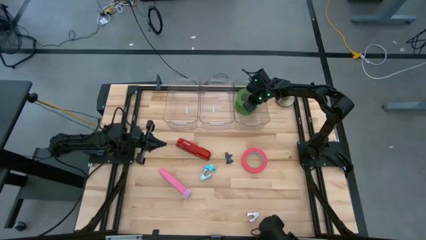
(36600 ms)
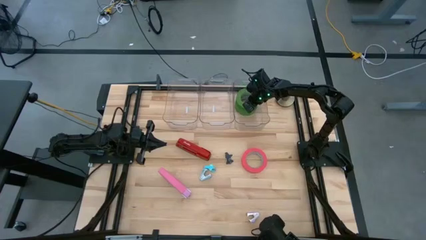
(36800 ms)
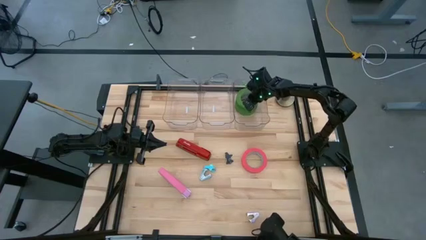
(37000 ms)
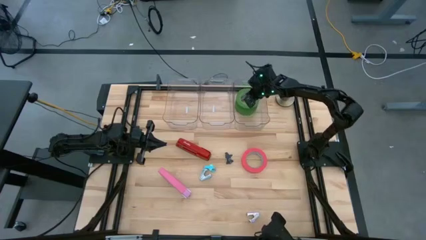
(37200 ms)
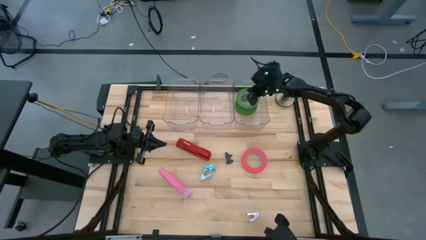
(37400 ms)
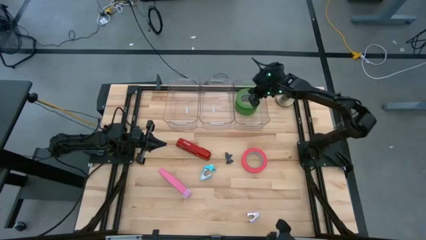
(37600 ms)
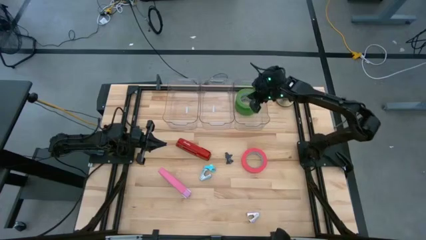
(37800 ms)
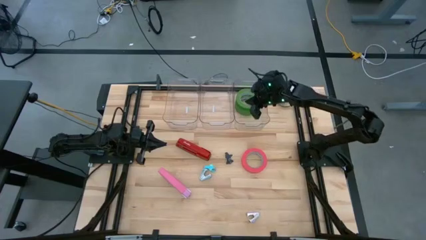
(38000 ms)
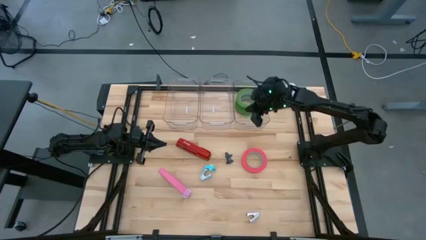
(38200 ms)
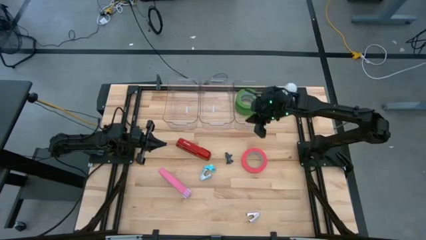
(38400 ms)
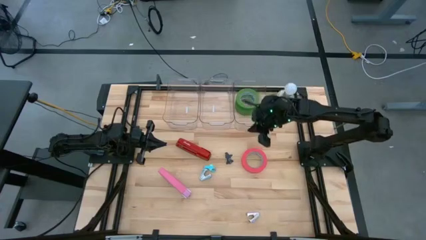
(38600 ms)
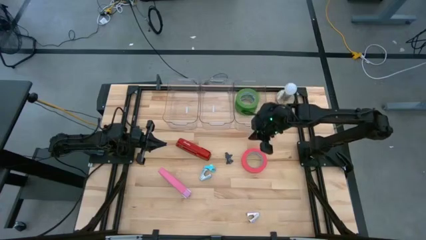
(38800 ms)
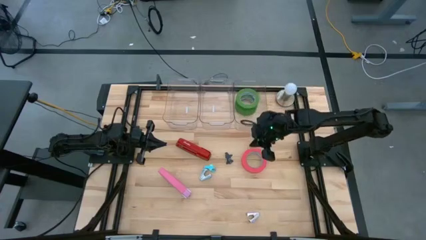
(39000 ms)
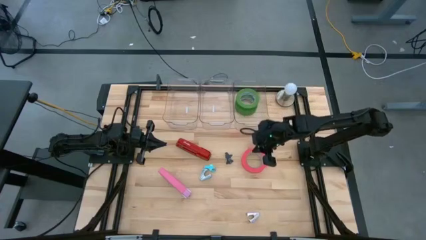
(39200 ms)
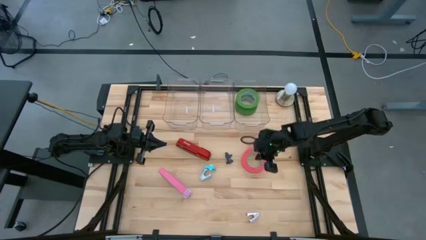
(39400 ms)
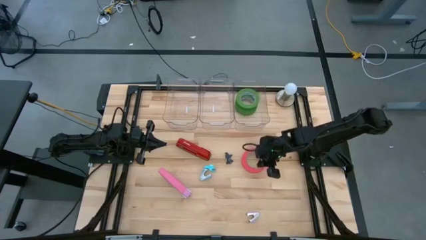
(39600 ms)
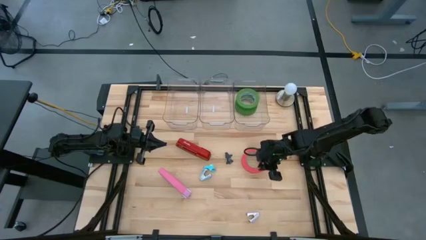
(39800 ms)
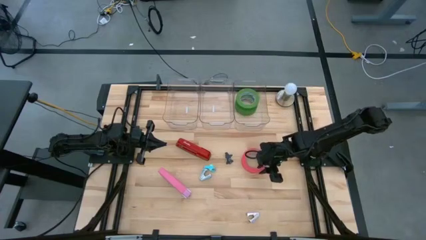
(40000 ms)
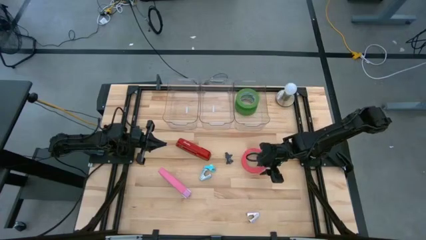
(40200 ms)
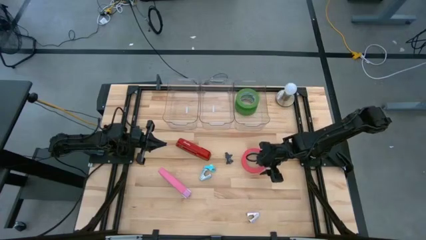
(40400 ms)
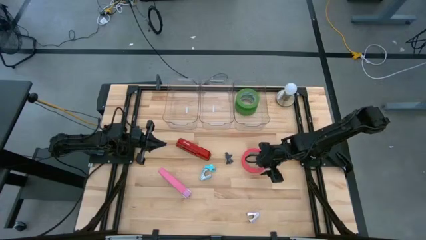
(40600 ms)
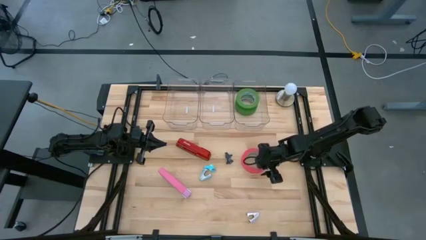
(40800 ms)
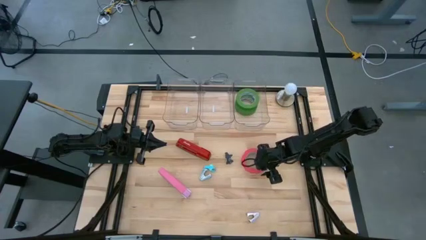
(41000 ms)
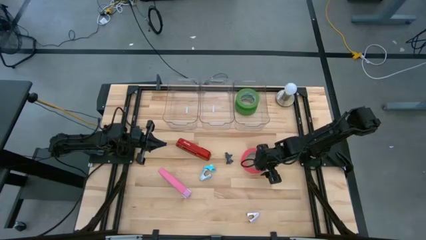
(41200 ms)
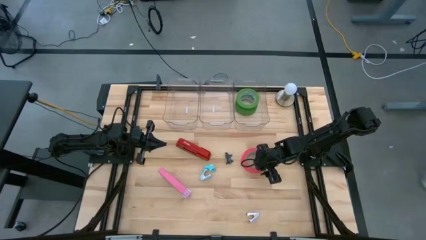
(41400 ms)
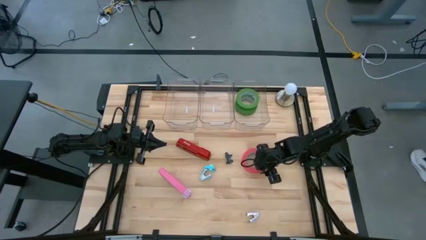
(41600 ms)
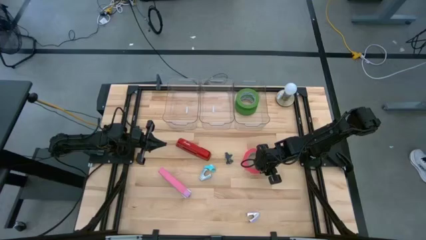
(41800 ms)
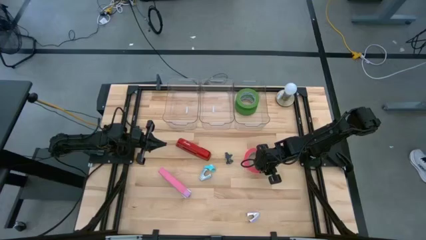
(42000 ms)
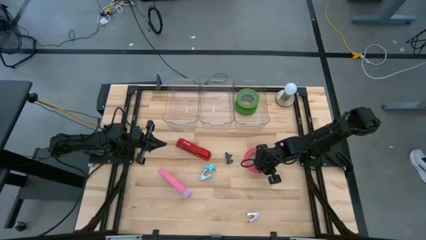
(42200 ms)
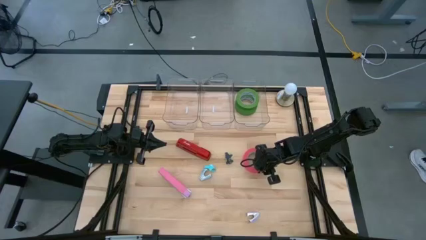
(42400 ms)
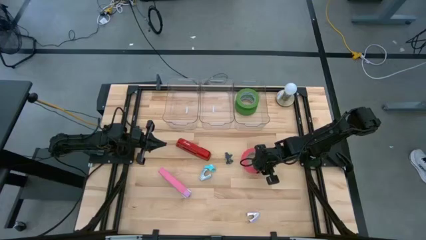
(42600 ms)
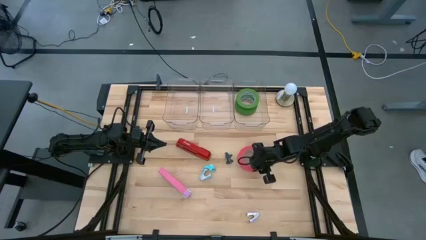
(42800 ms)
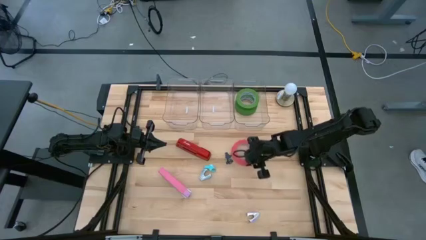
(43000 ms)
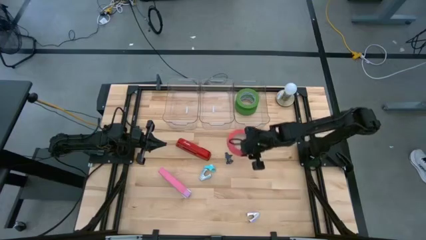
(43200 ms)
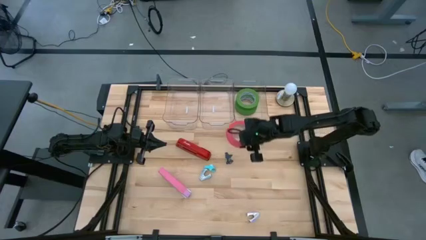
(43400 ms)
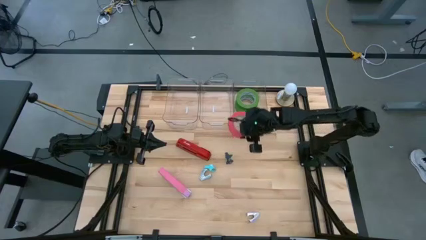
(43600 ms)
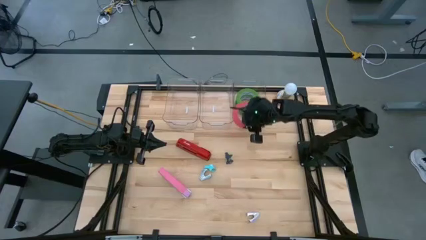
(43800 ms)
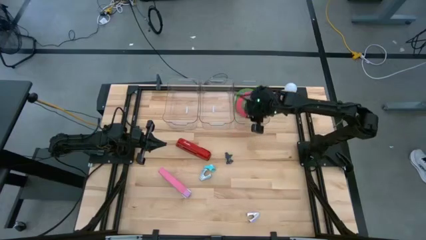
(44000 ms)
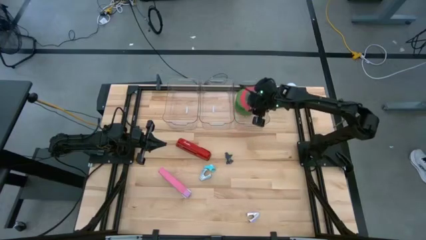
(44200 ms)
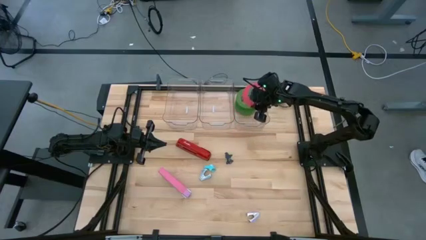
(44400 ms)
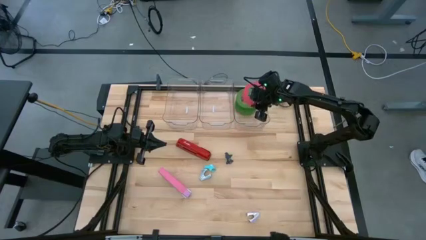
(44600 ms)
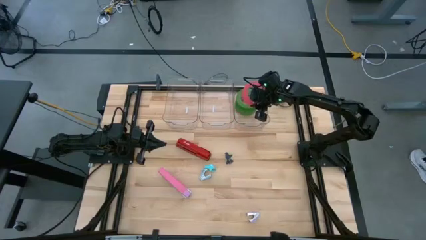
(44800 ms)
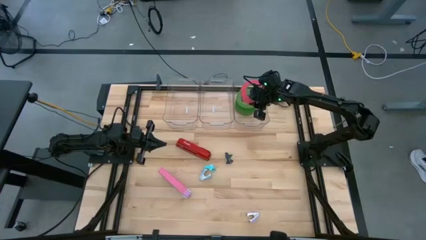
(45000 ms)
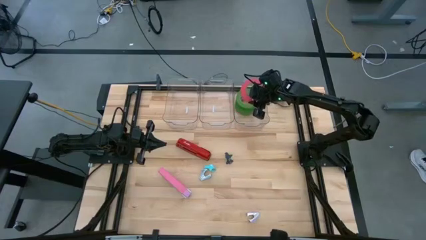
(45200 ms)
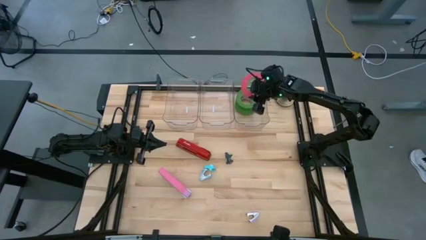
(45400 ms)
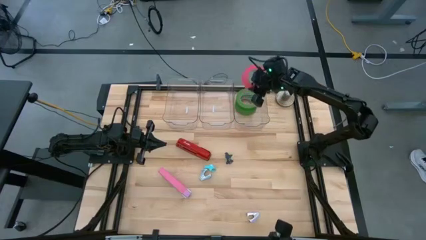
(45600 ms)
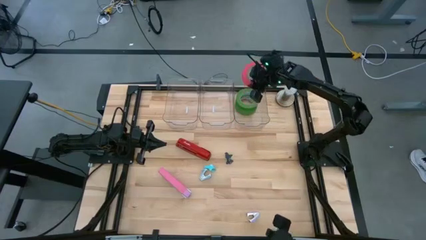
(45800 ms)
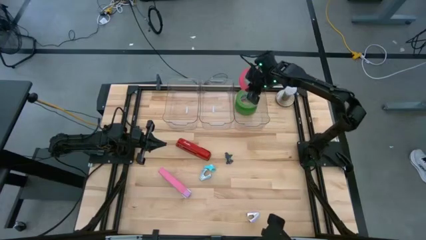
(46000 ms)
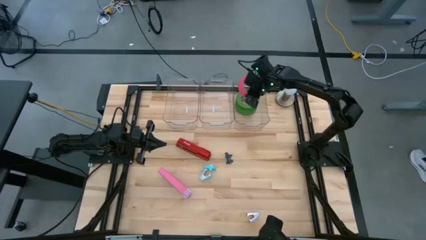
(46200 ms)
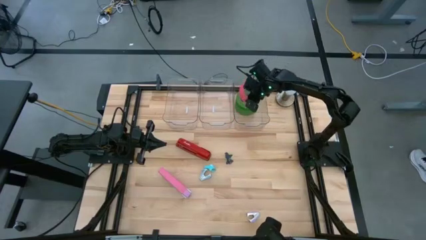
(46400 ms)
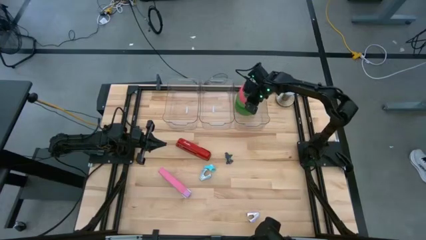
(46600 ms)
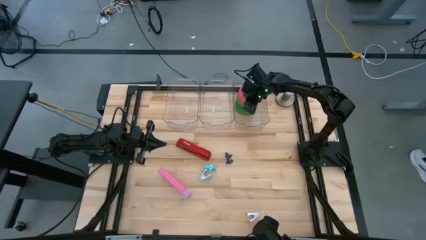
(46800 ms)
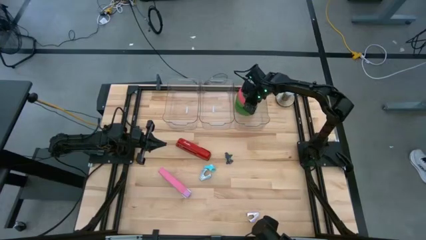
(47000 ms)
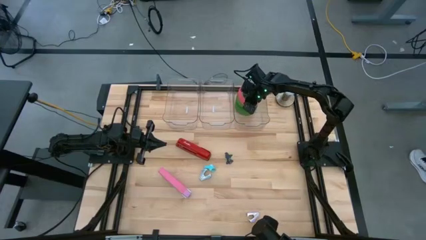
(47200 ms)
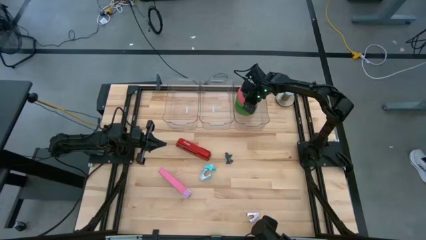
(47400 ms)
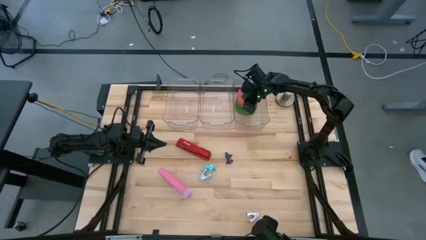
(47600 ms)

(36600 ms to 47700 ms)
Task: Pick and place Stapler, Stapler remover, tape
Put the pink tape into the right transparent bin

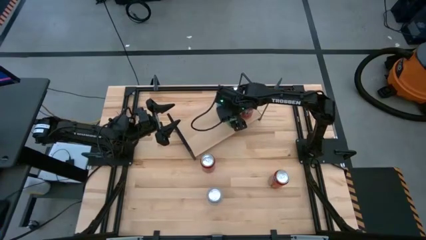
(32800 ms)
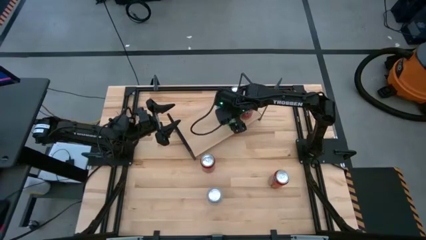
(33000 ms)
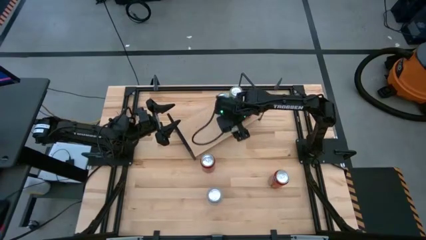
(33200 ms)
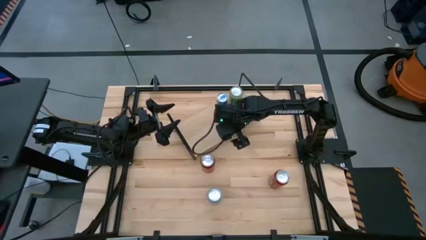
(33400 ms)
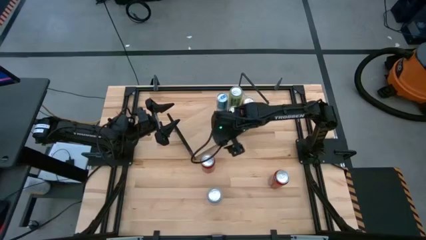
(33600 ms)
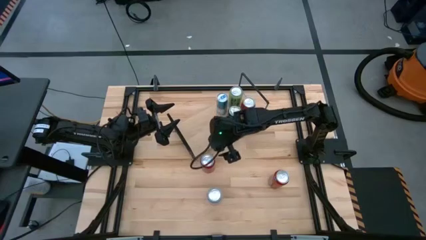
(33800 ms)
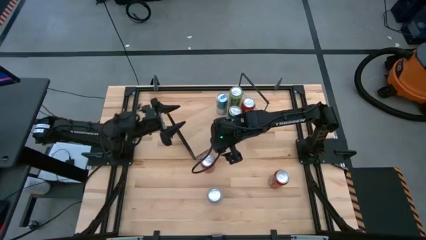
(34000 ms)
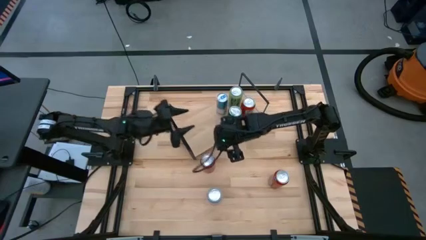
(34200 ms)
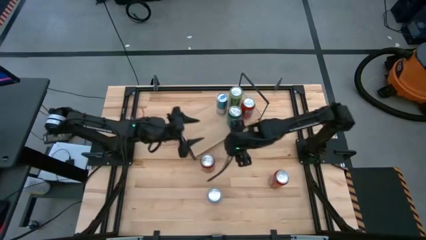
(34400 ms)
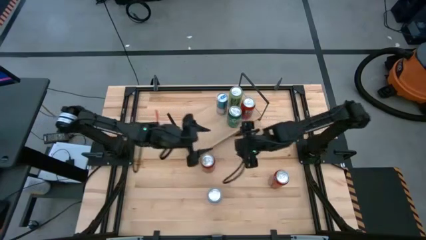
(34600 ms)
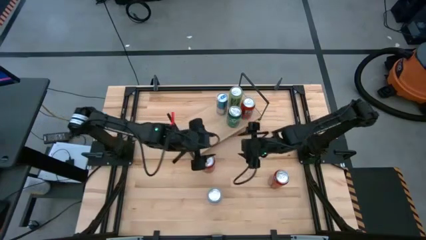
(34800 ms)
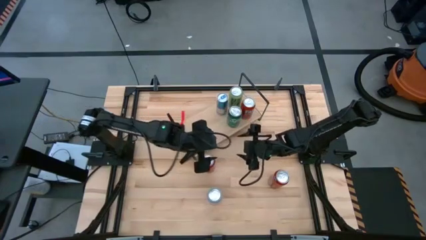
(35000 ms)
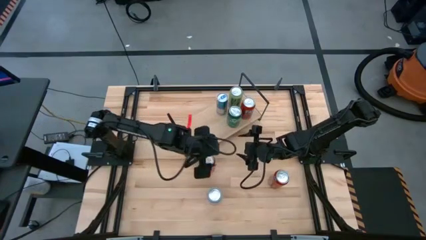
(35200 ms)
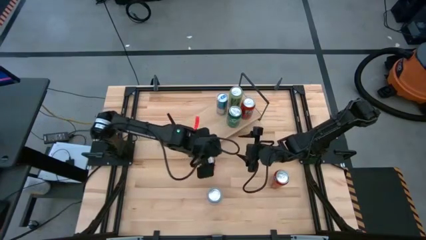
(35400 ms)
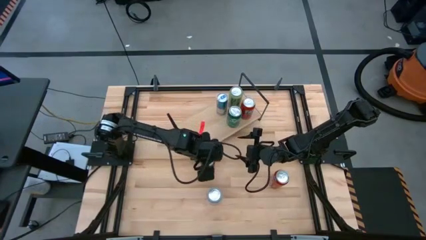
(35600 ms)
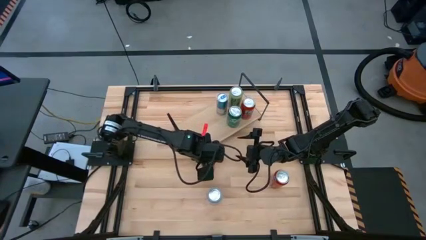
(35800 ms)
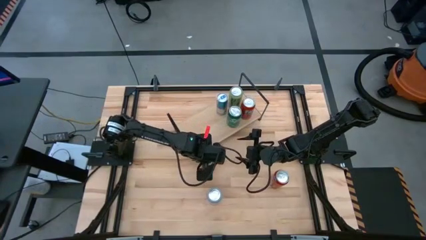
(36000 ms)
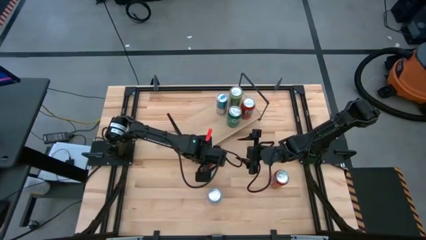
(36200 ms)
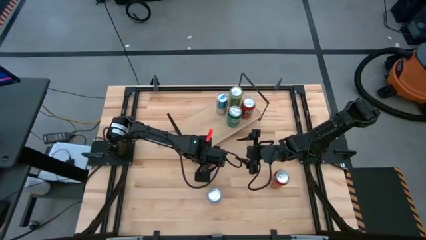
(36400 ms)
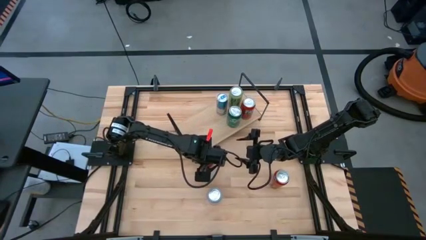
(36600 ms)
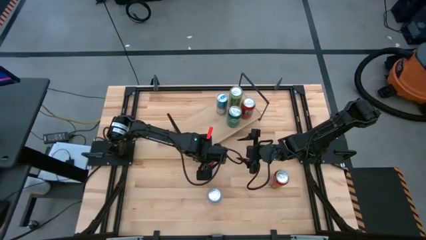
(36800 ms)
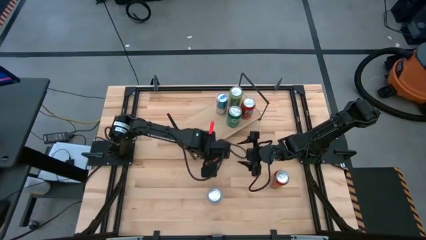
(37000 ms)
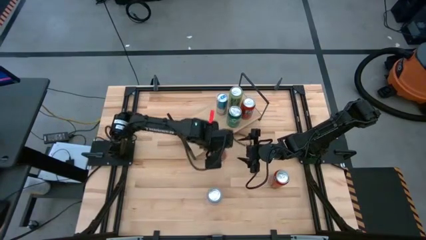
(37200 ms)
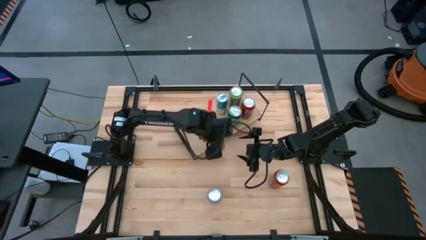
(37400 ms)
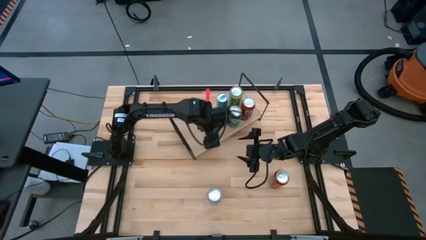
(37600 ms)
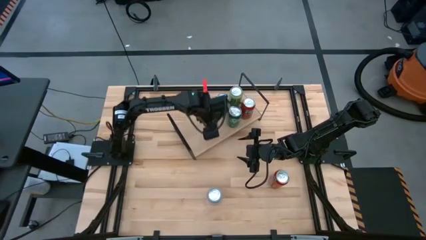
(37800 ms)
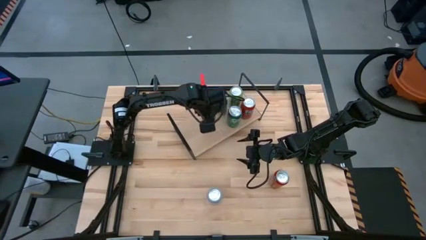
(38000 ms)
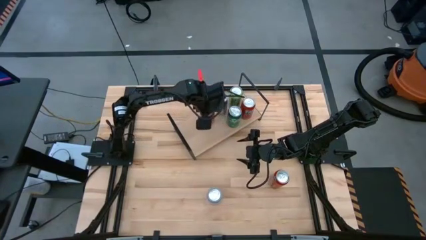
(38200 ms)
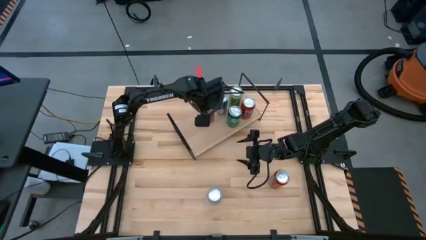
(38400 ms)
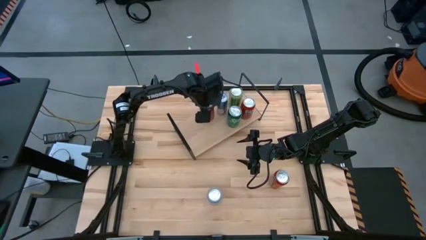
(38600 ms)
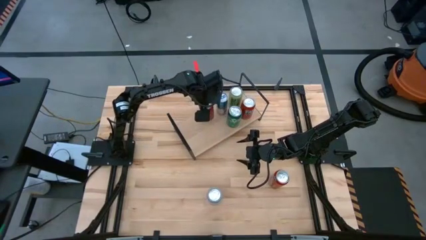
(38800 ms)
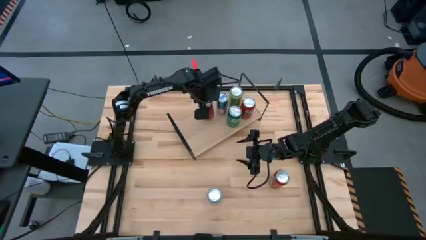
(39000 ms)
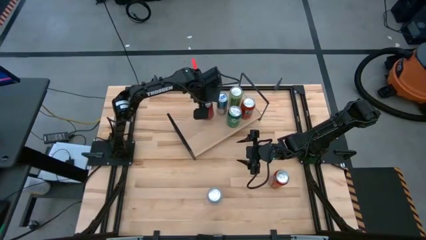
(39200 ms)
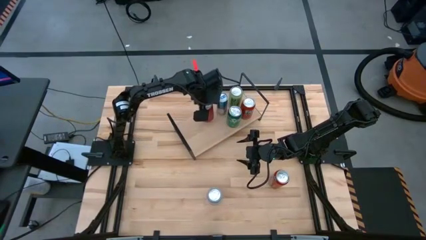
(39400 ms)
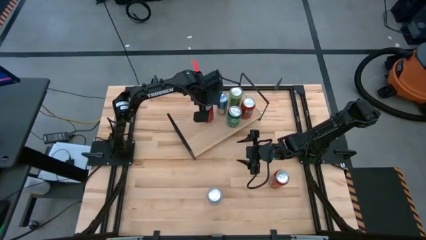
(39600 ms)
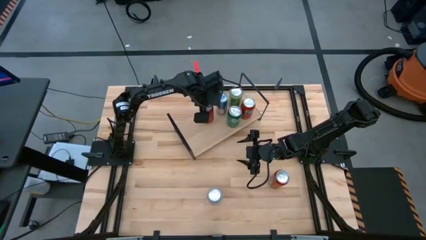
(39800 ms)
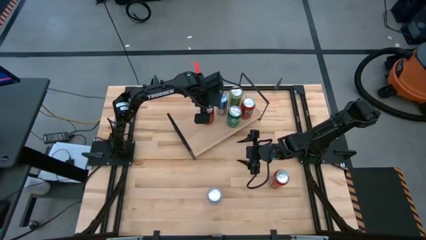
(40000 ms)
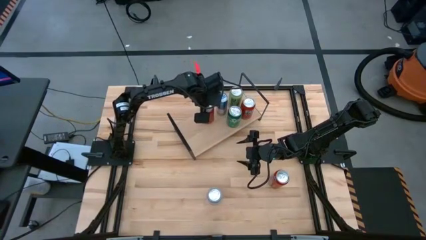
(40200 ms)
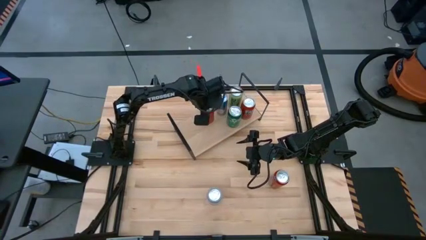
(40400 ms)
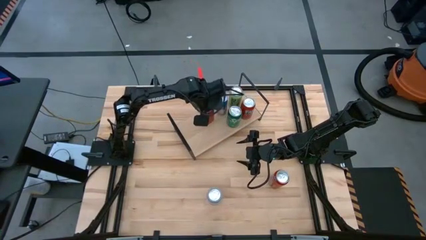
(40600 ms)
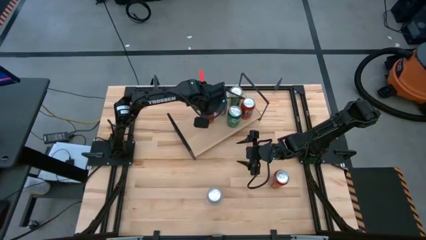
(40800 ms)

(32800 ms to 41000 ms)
Task: Place canned beverage on shelf
Put the red soda can on the shelf
